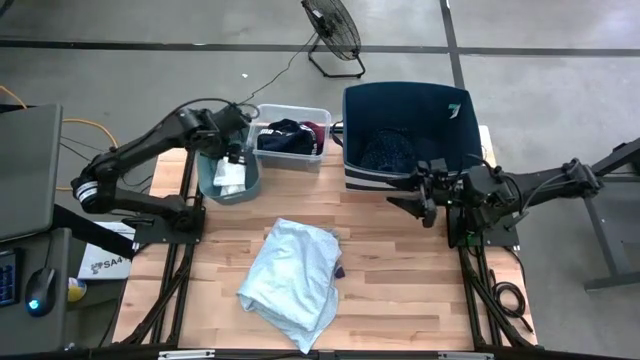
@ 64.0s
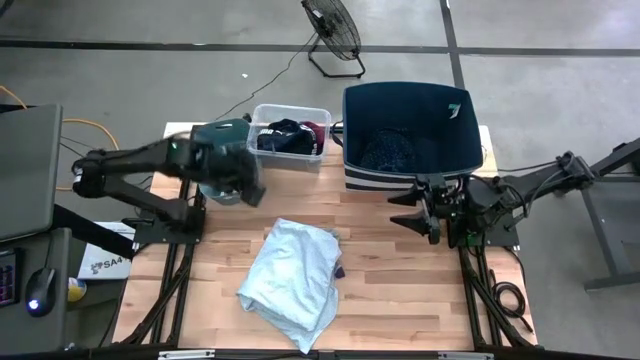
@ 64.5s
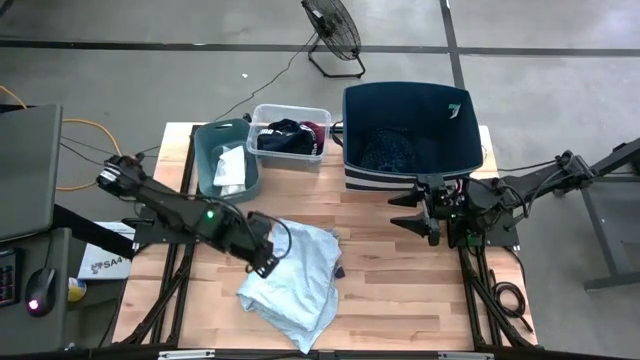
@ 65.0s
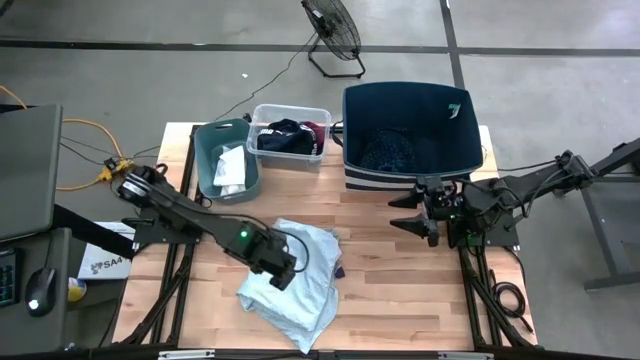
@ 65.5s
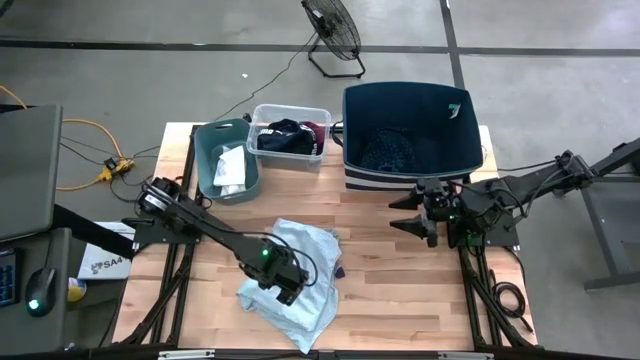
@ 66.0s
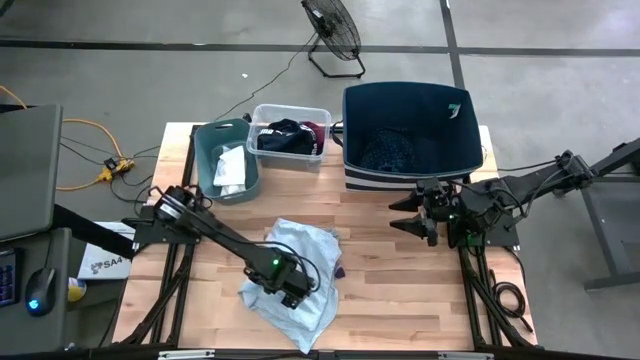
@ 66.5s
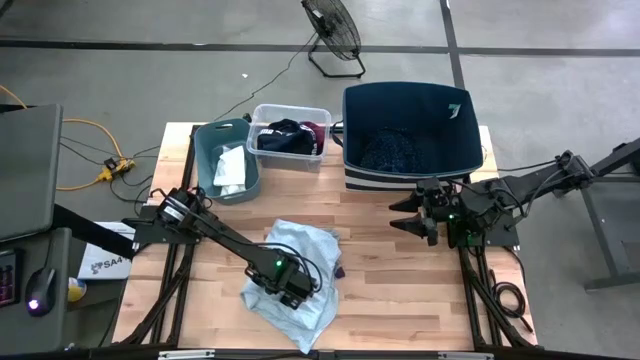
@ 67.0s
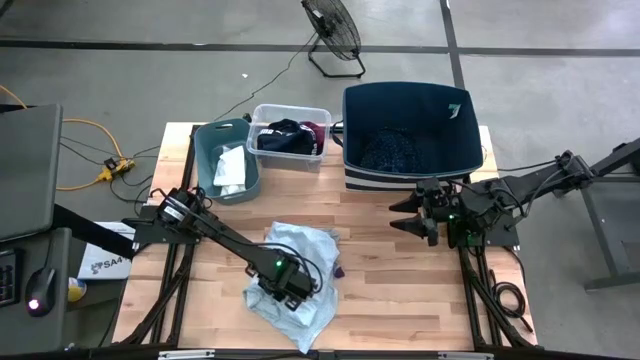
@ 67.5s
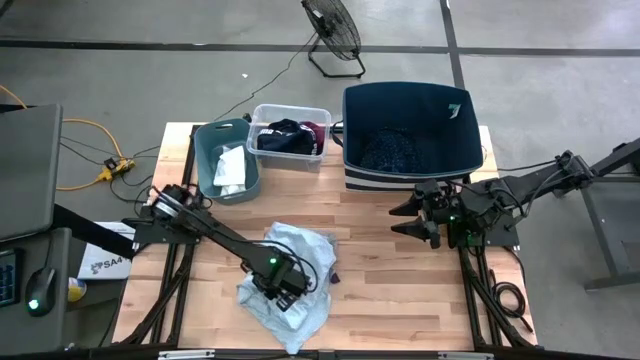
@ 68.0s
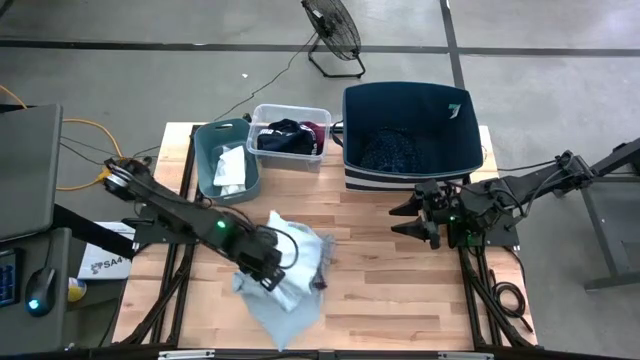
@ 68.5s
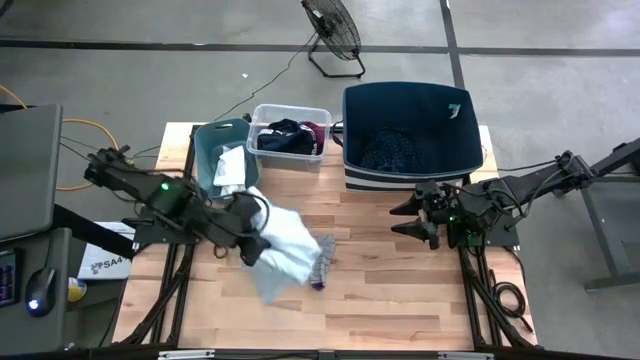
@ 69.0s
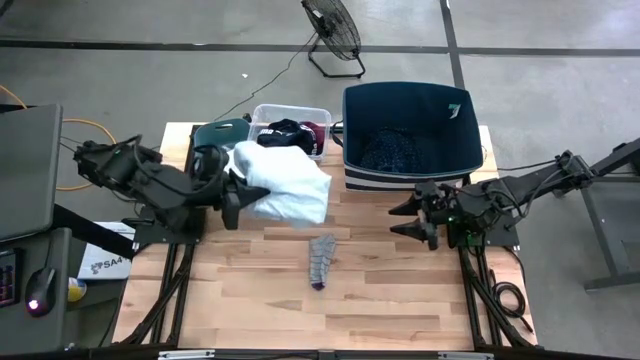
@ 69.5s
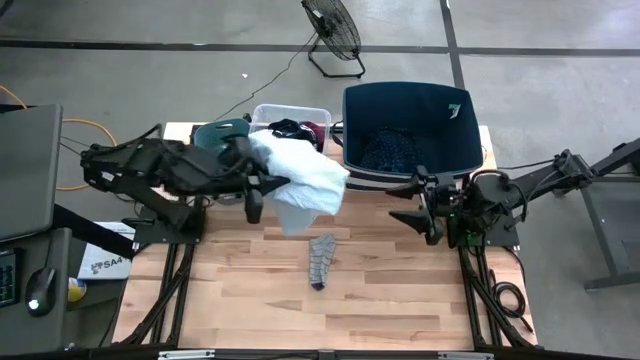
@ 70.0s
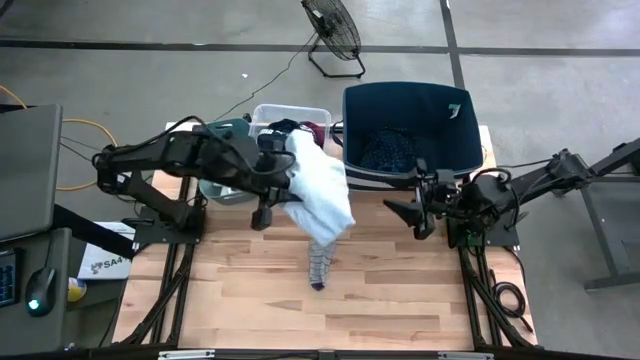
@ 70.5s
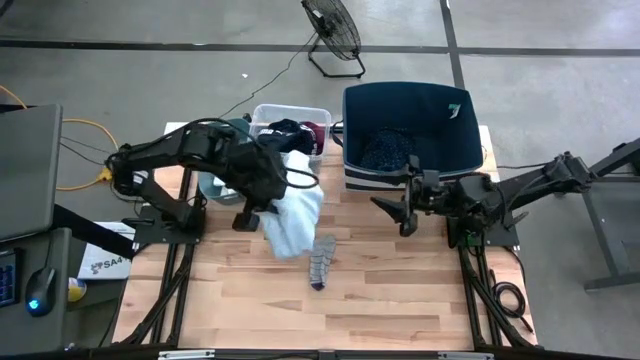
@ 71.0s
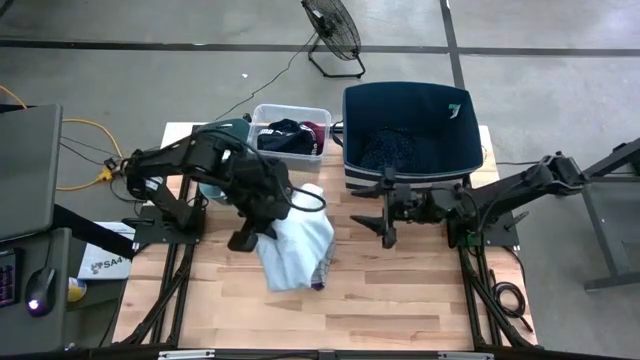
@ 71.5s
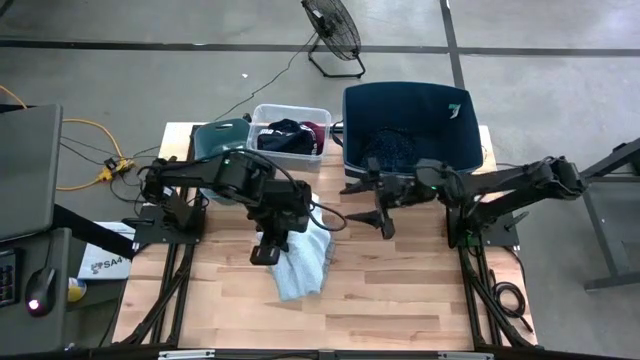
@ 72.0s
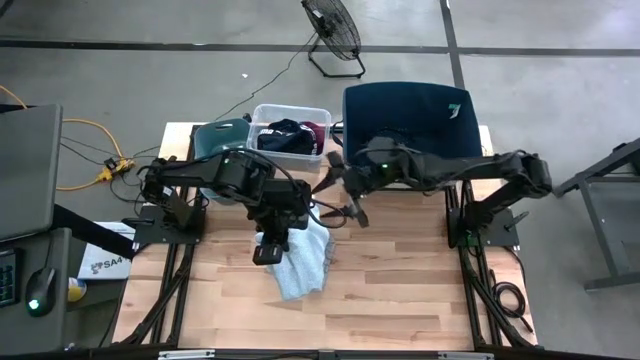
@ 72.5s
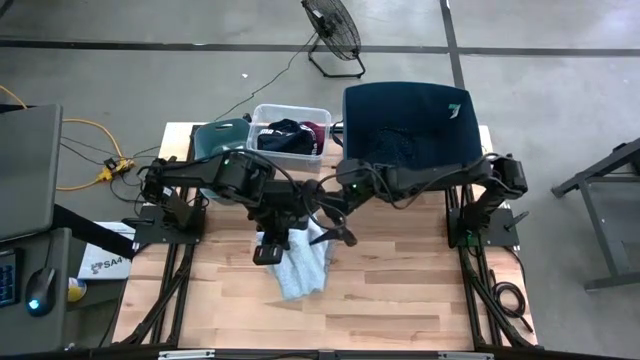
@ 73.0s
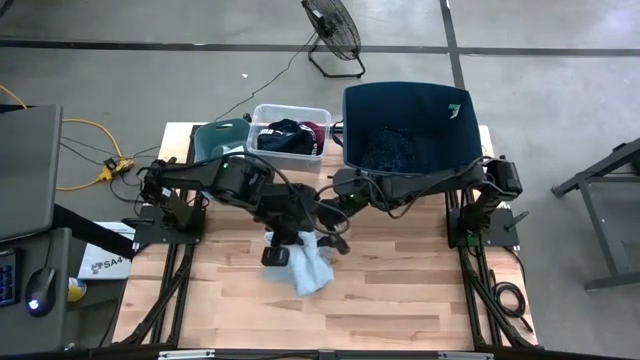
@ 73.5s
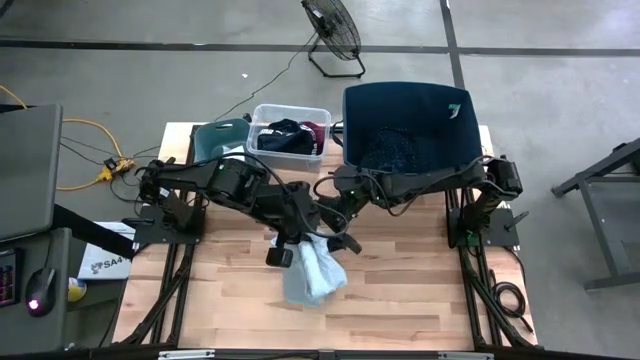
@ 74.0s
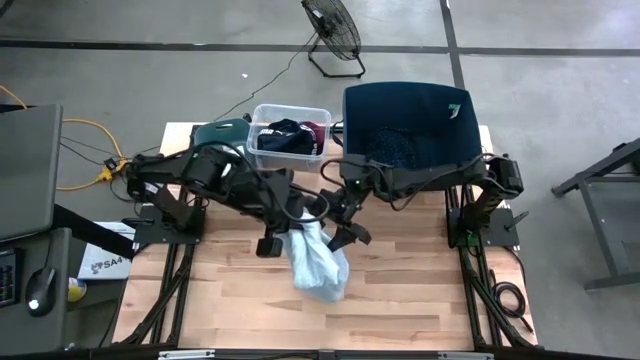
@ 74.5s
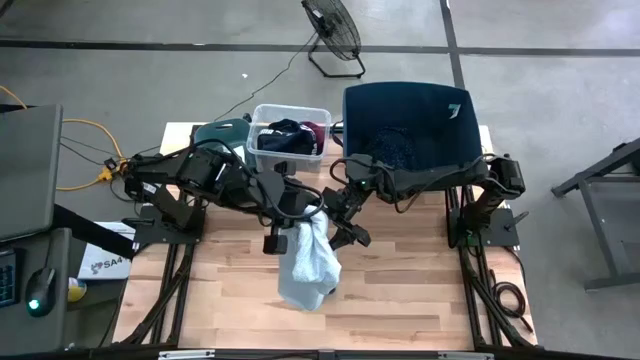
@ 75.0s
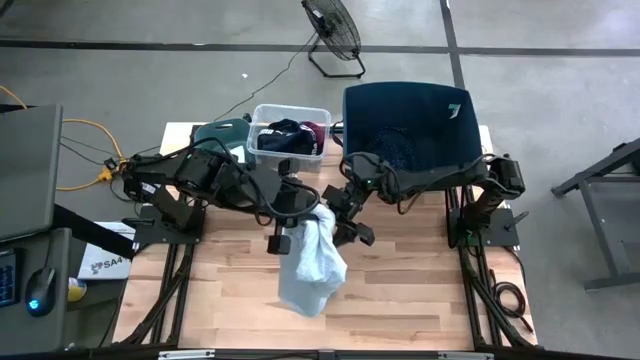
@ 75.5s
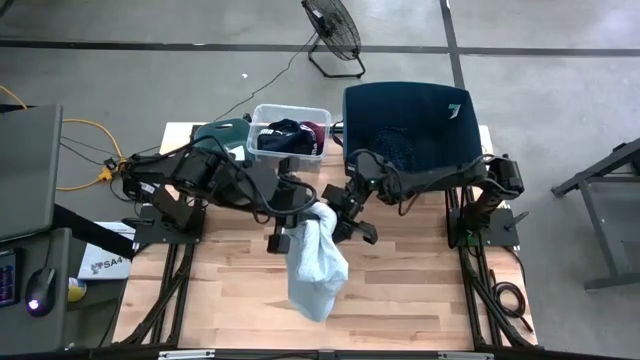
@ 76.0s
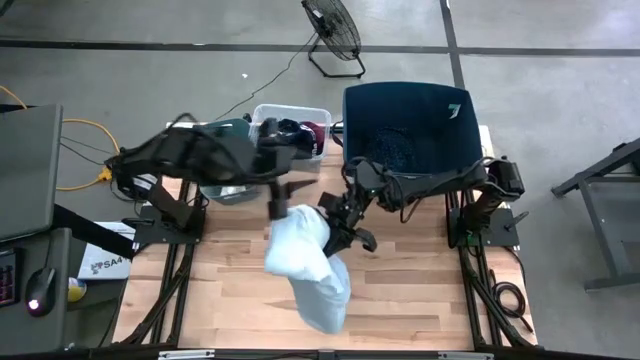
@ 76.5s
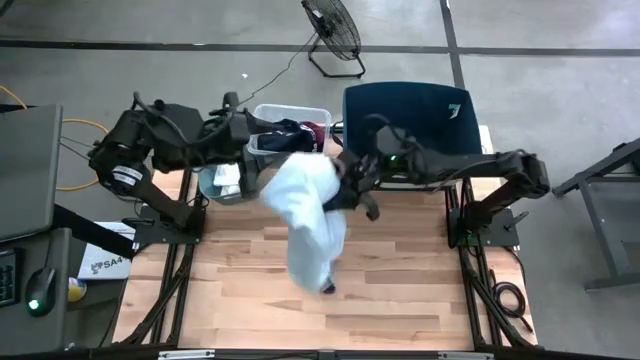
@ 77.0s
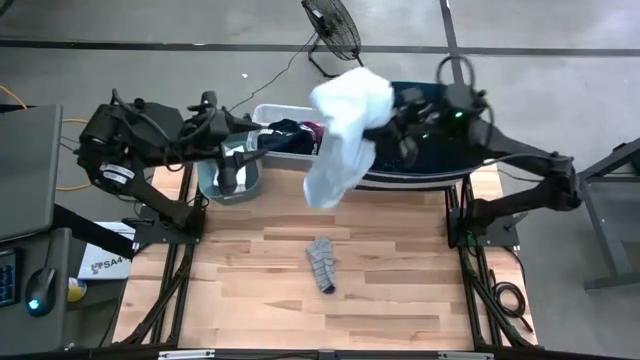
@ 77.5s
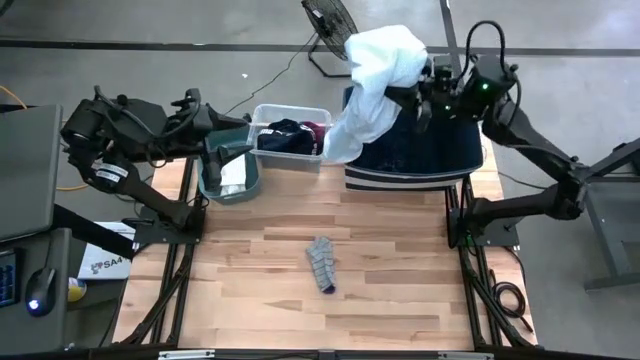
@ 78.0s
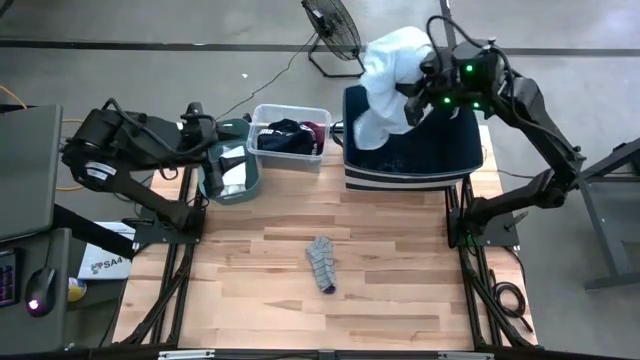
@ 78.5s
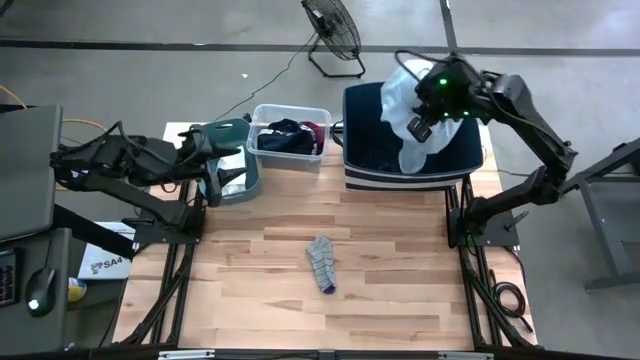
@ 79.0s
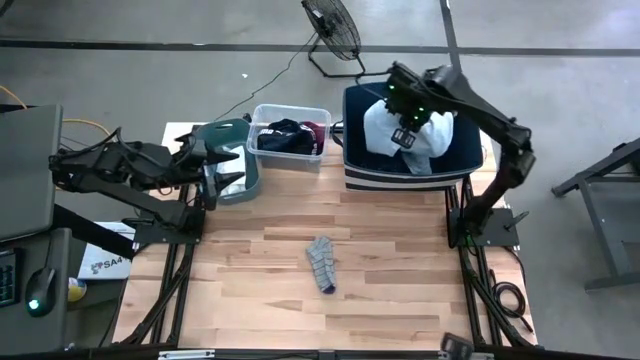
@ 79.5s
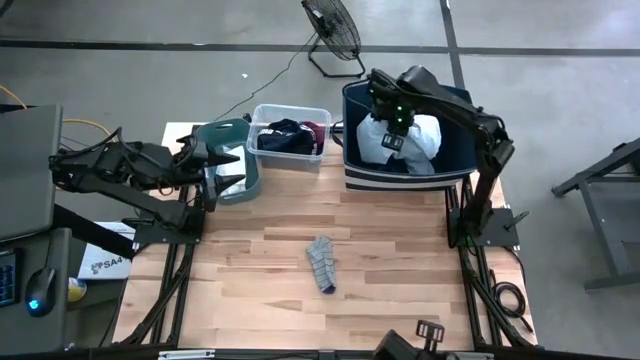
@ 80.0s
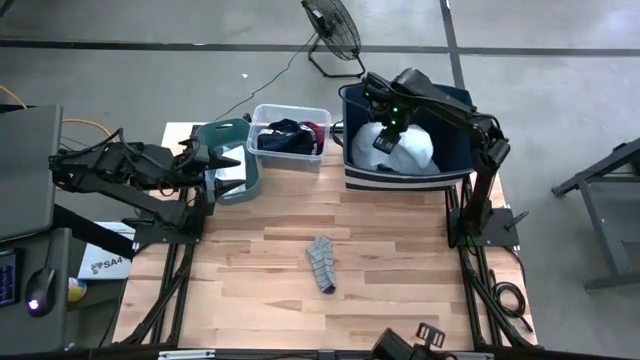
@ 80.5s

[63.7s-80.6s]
Task: Pick & Place Cloths
Put the white polo shirt into the blue laundry organizer
